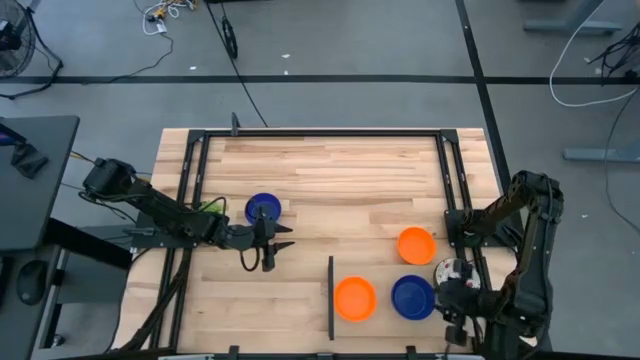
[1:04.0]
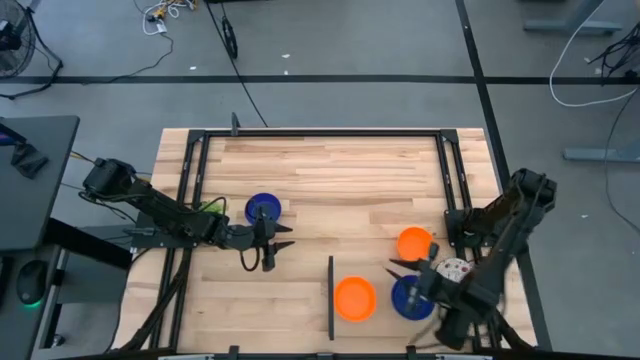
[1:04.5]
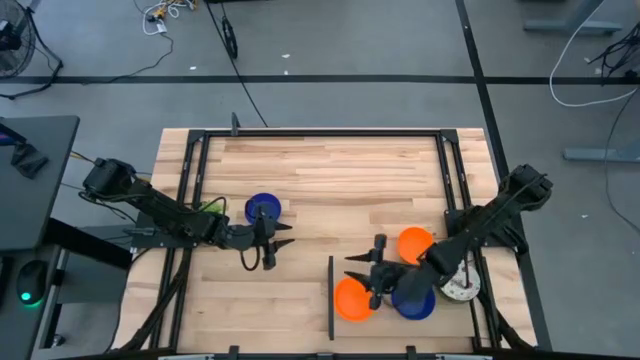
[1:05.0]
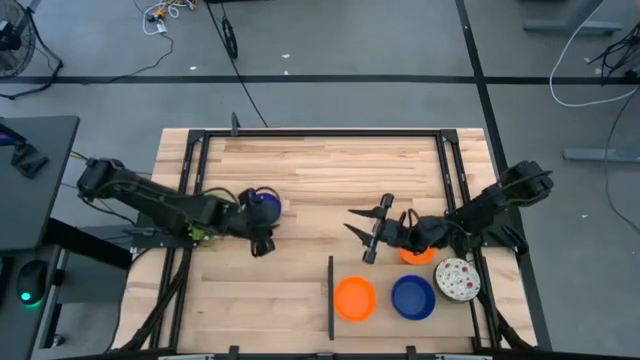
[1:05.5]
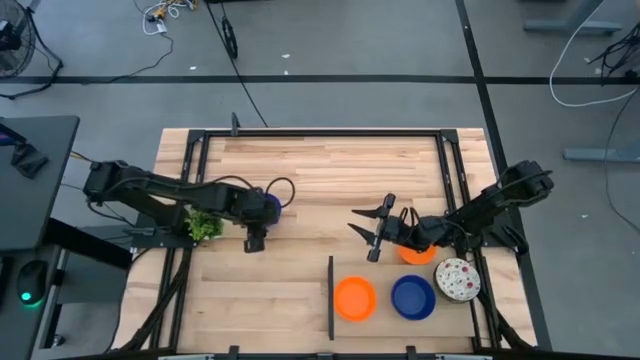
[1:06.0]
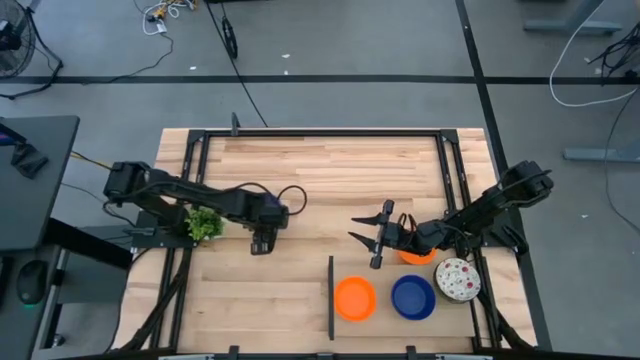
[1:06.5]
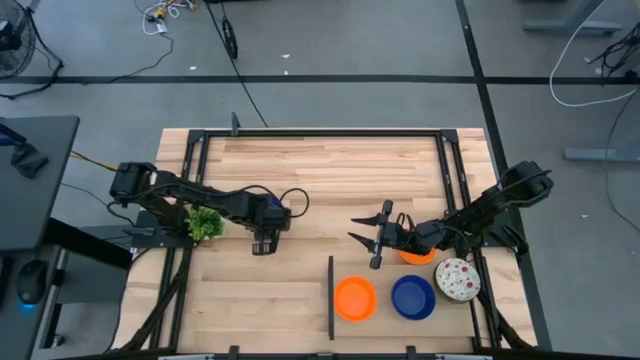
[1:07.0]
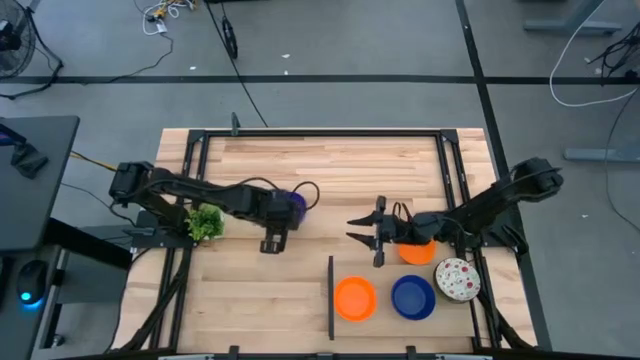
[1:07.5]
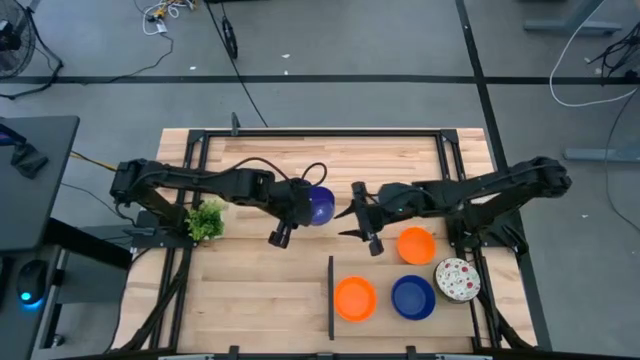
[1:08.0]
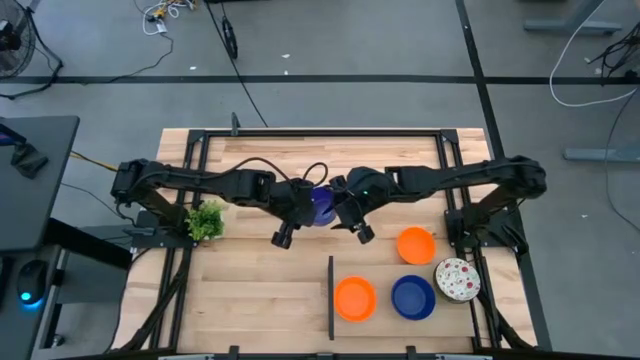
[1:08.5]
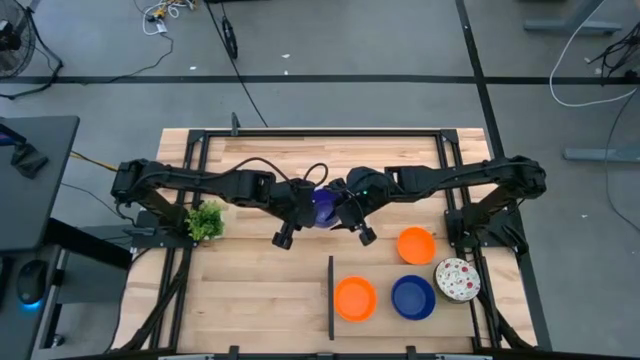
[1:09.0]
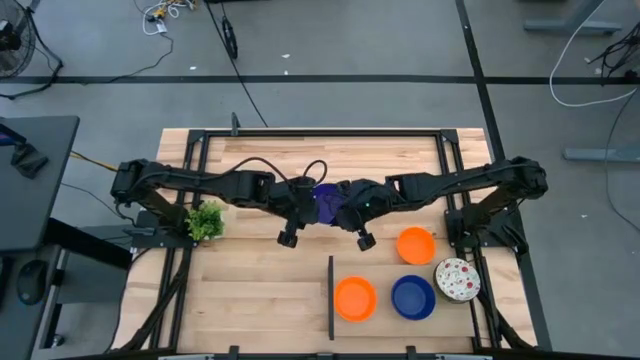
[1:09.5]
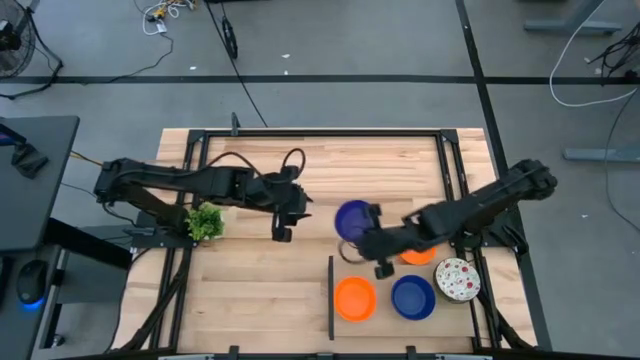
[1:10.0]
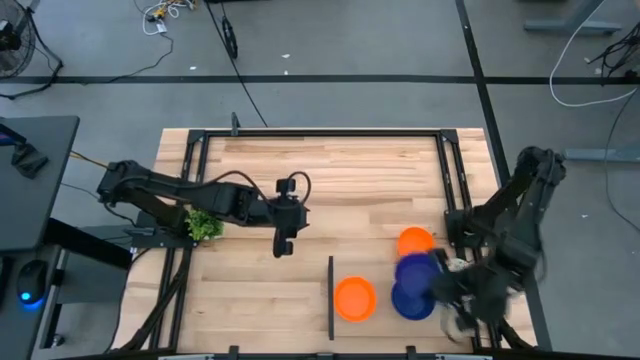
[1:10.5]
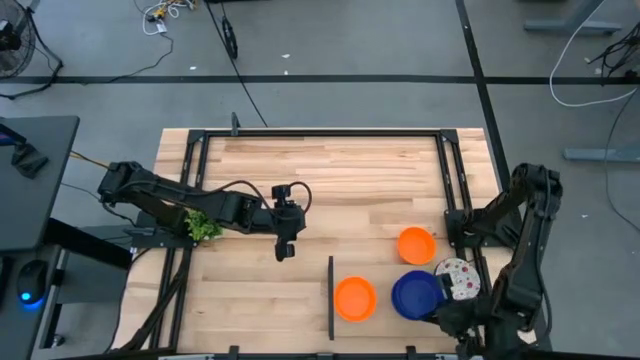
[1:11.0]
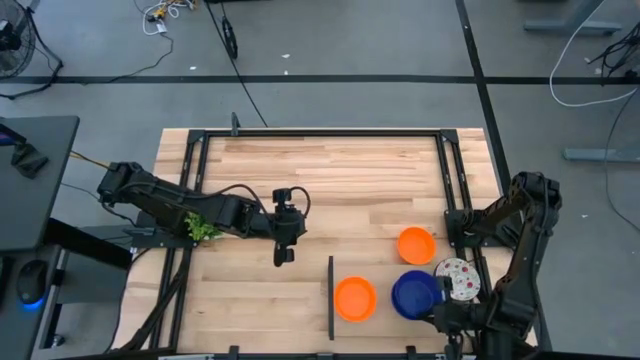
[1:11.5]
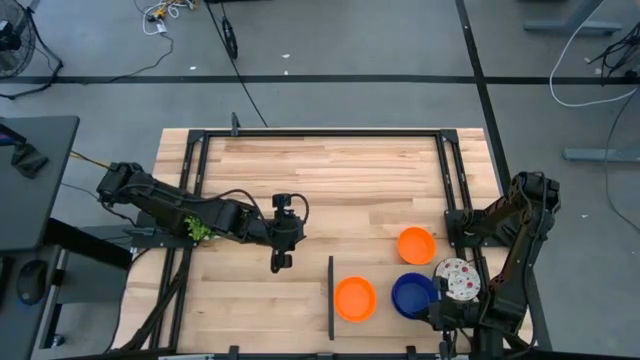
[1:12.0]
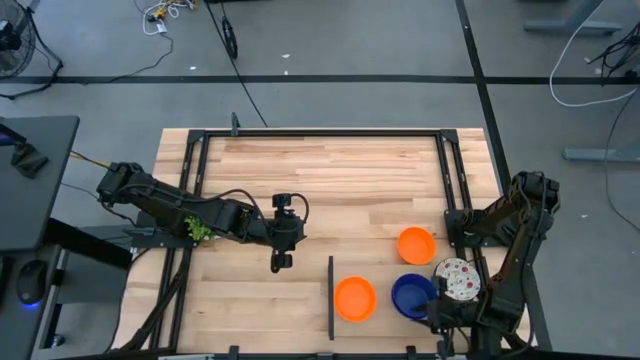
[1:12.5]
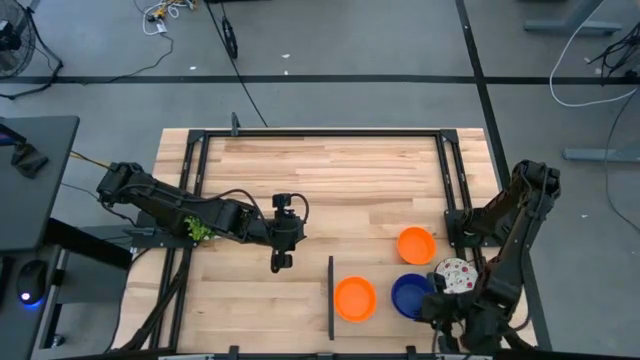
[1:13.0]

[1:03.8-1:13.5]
Task: Pick & Place Mini bowls
Stack the blue bowl on the blue bowl on the shelf

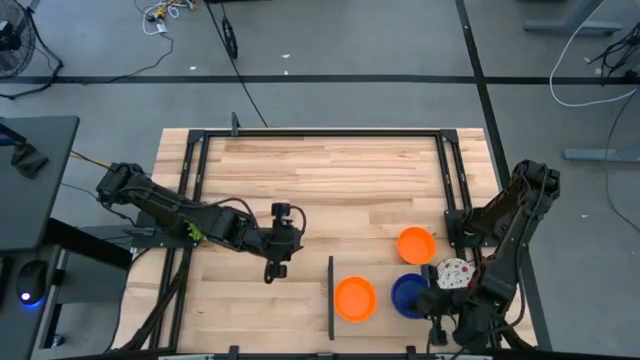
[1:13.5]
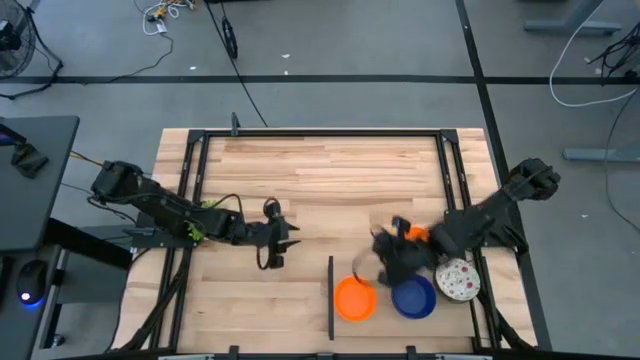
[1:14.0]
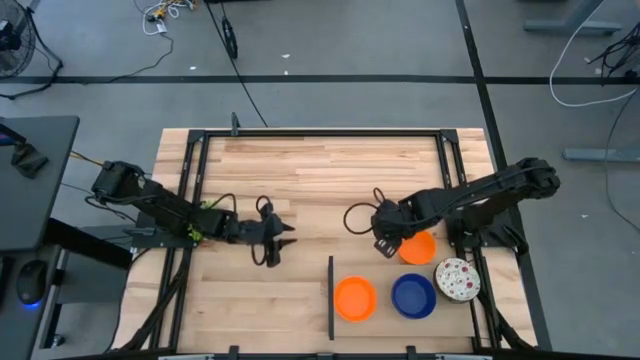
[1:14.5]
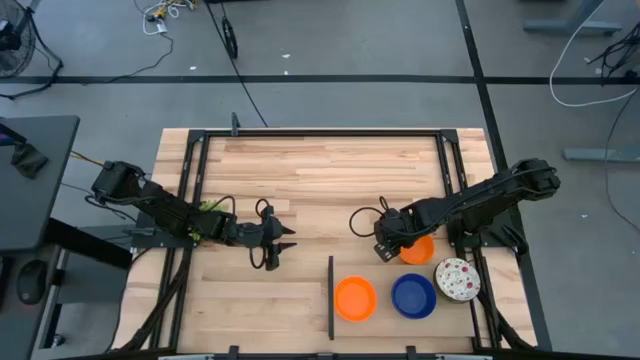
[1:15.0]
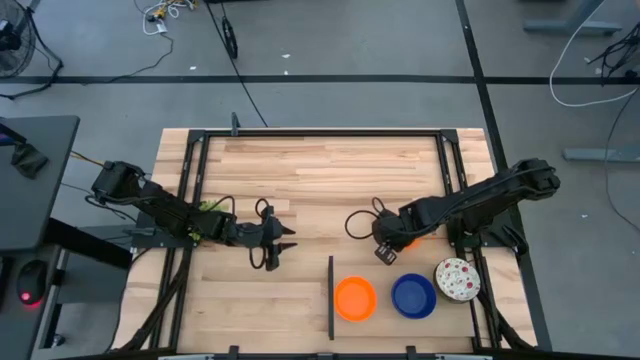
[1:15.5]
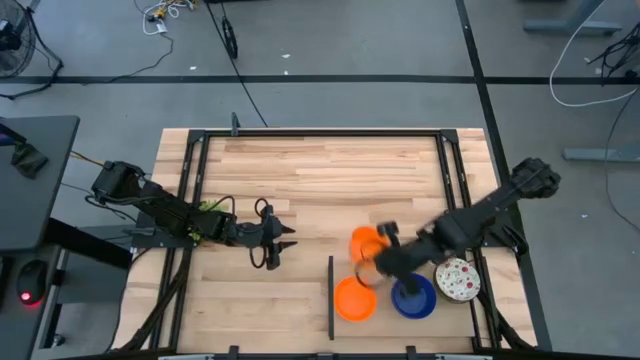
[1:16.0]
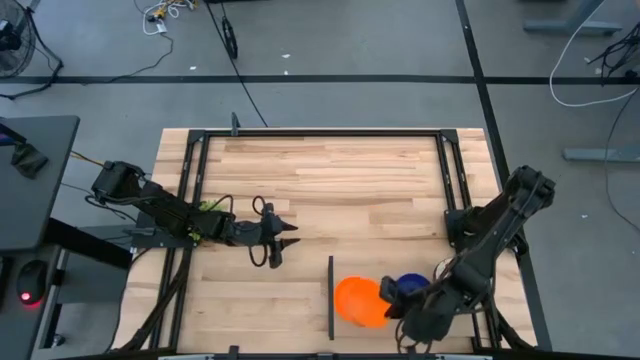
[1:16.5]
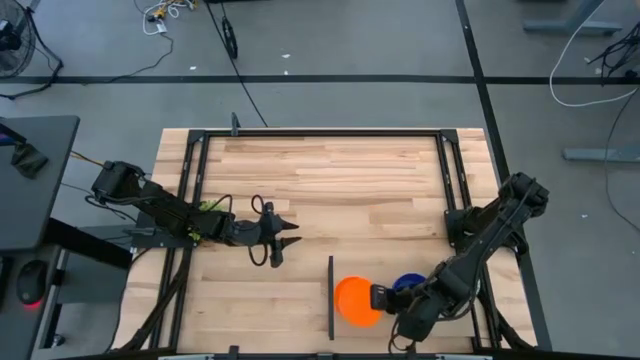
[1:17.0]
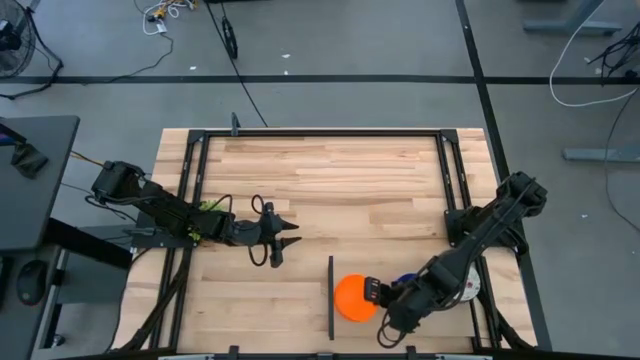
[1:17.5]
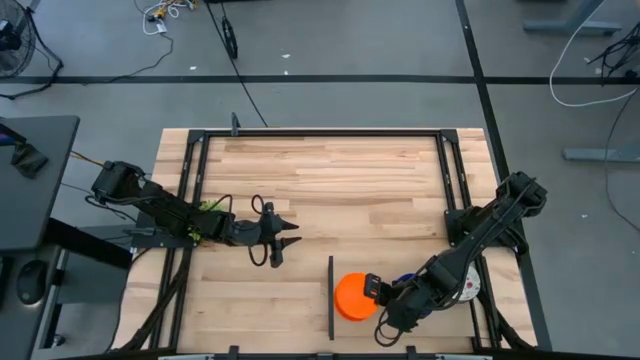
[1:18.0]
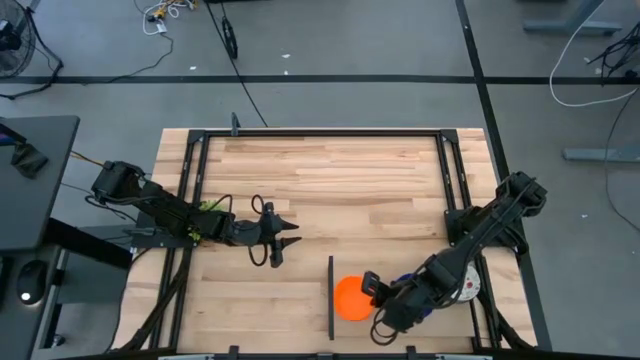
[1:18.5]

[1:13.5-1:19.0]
Stack the orange bowl on the orange bowl on the shelf

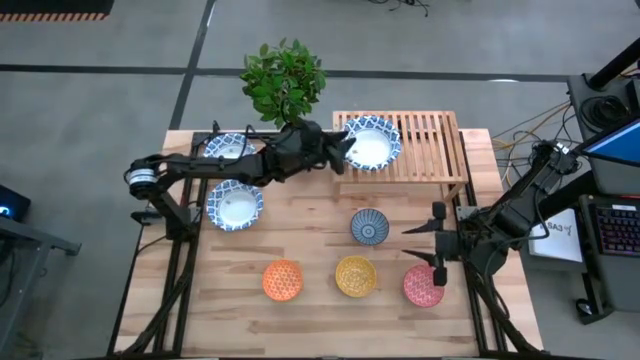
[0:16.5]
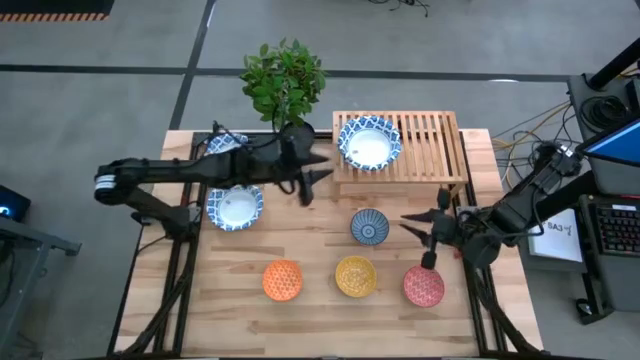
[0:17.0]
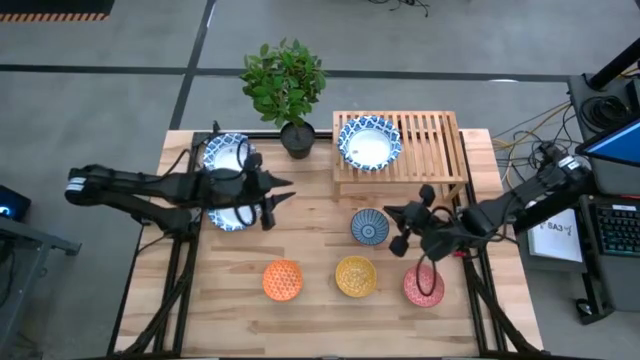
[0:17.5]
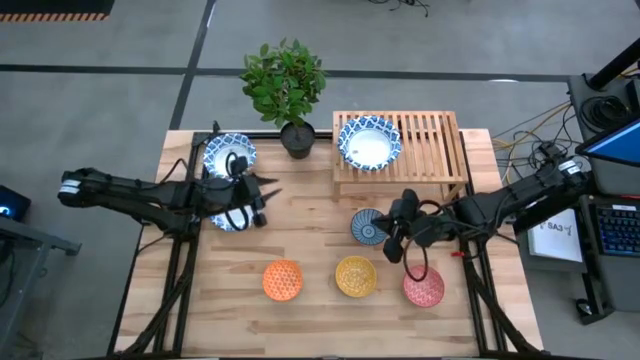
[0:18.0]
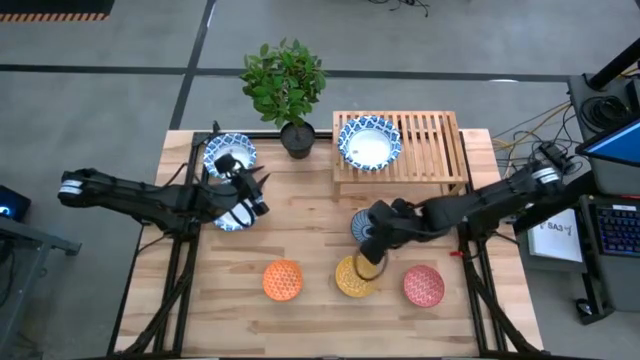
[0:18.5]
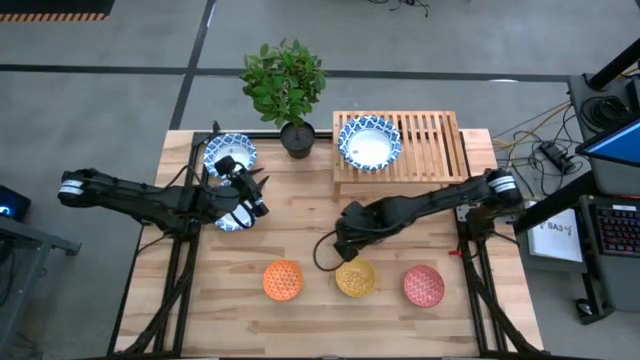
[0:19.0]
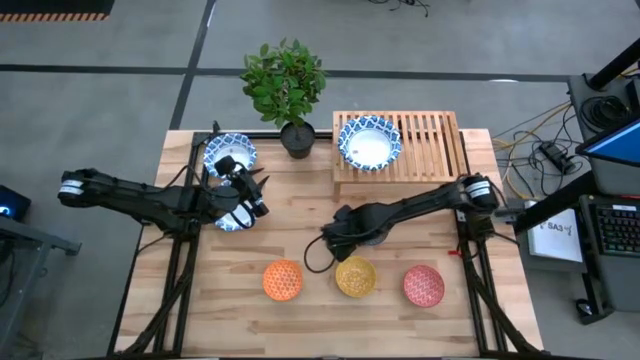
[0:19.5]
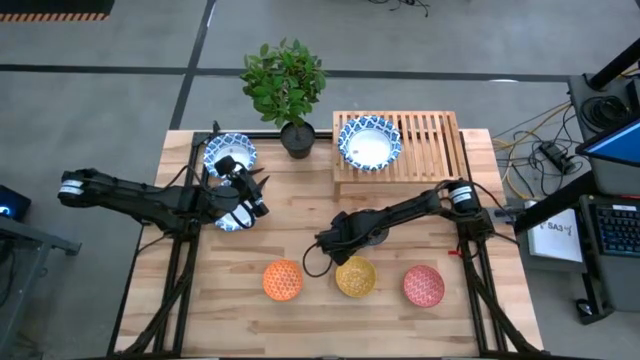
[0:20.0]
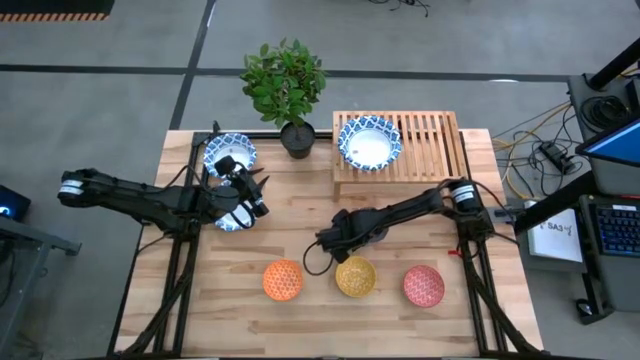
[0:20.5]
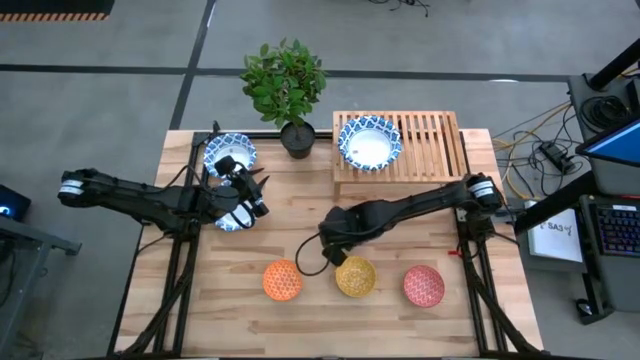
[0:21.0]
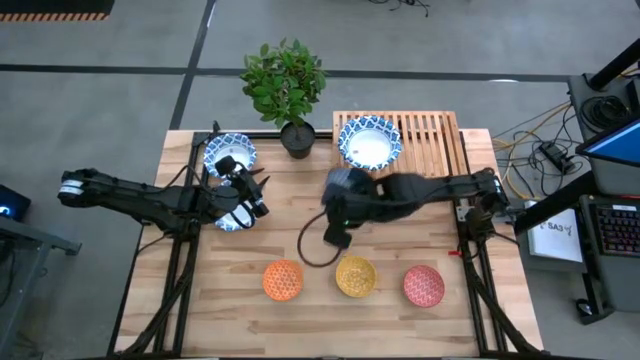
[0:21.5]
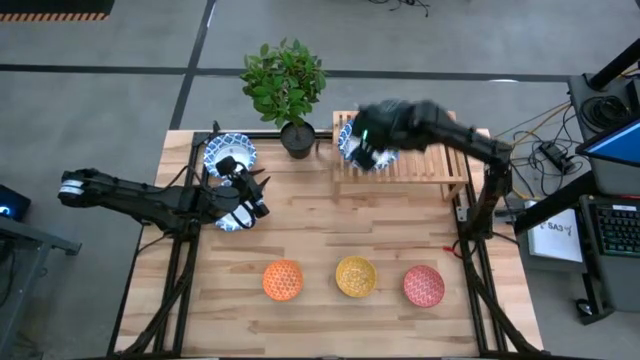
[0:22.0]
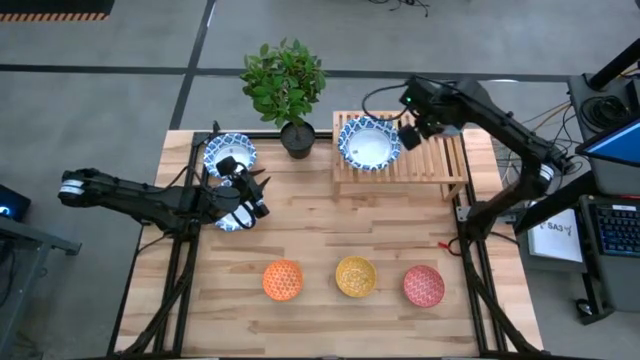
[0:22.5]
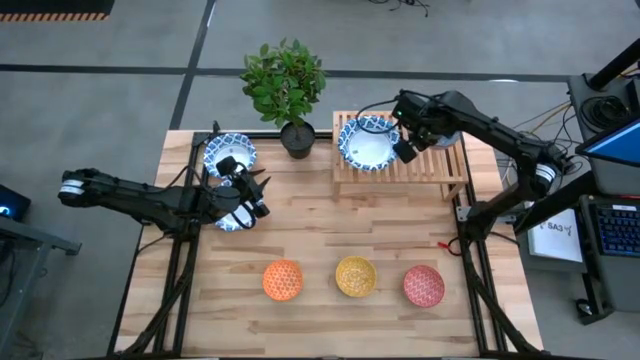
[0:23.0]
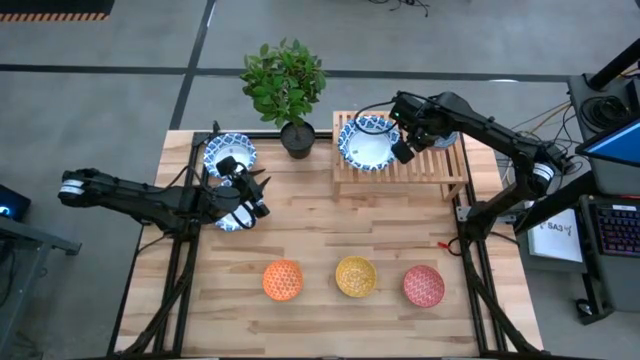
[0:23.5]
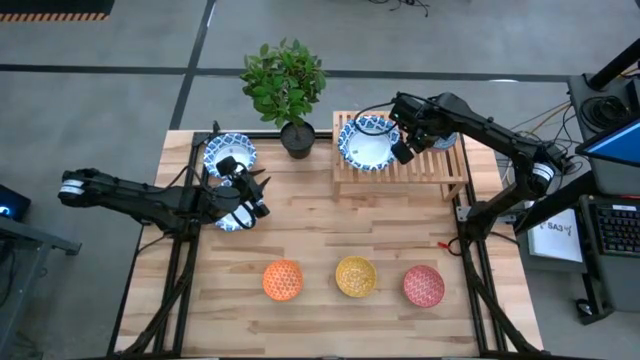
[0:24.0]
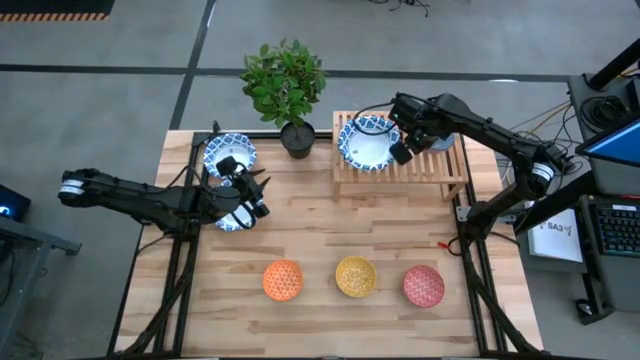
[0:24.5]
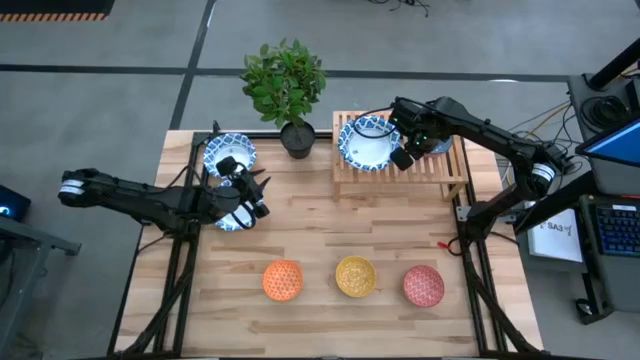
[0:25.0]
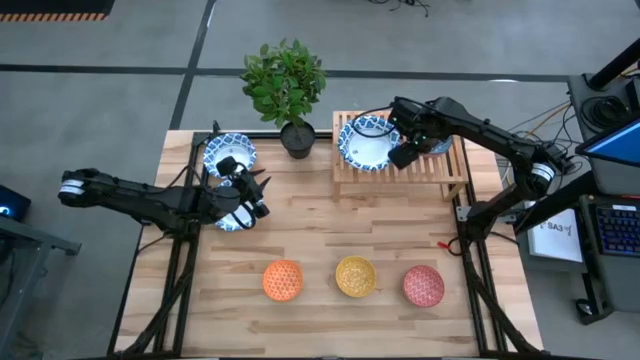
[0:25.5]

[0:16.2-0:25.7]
Task: Place and stack bowls onto a shelf
Put the blue bowl on the shelf
